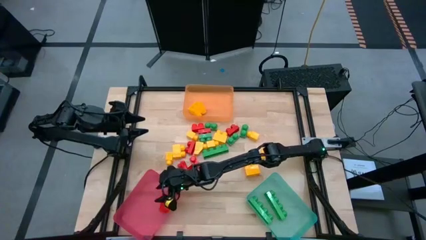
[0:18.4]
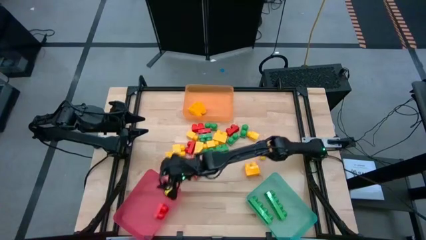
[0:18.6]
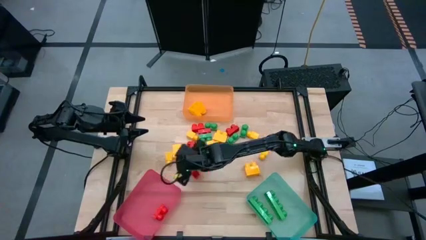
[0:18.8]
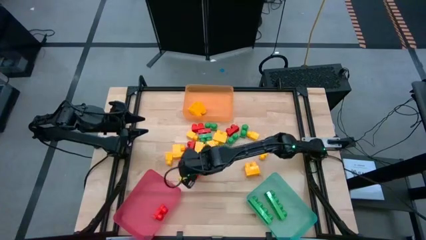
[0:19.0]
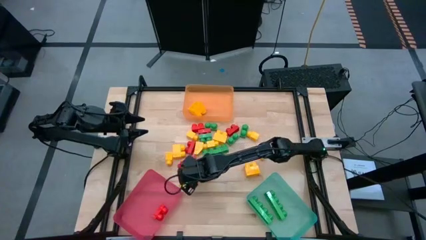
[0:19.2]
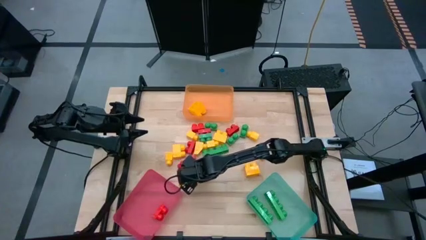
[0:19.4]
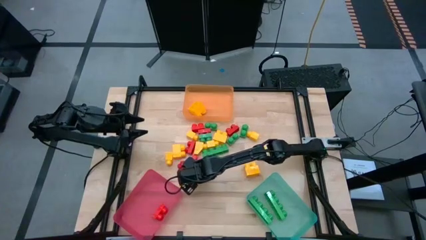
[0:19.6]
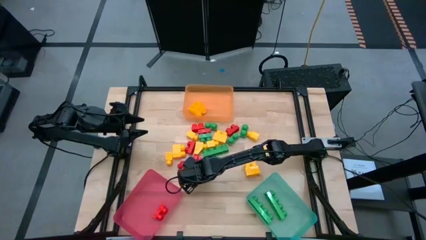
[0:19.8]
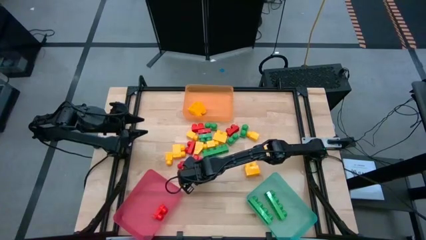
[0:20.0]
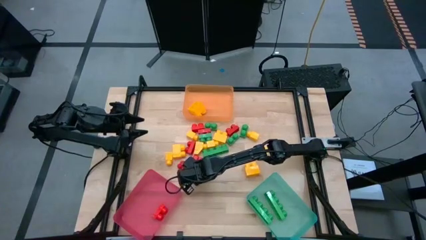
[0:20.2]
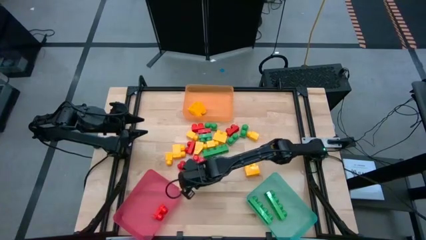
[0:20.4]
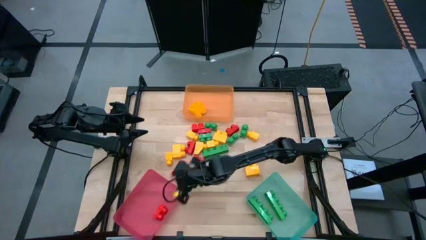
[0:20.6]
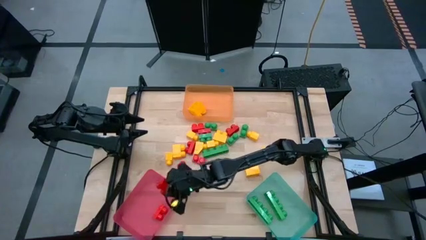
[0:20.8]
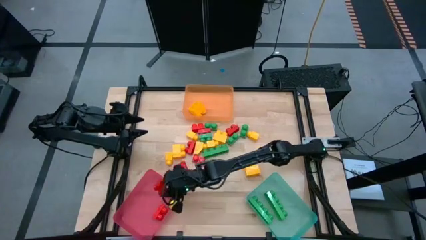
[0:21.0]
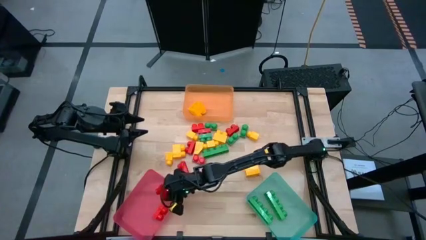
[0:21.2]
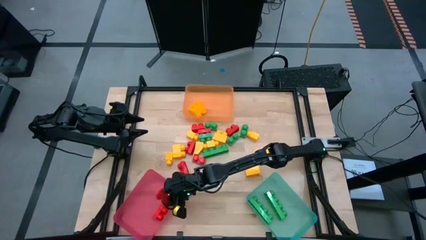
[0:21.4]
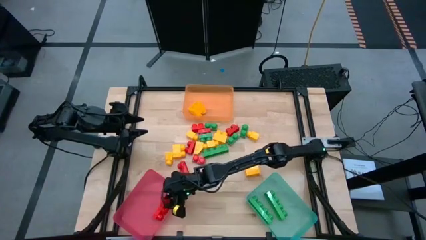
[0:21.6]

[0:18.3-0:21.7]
Task: Sort blocks
Put the red 2 stud game piece into the pink bin

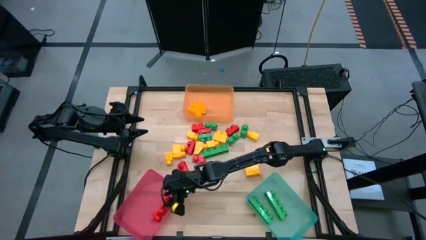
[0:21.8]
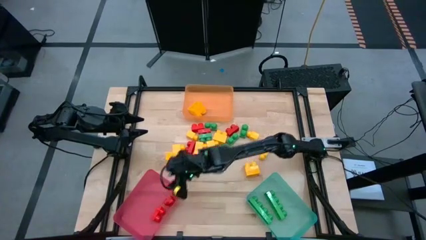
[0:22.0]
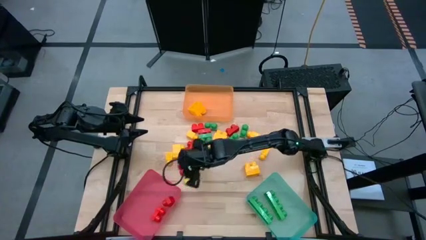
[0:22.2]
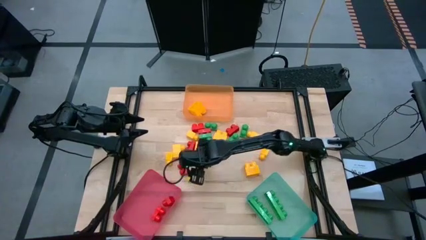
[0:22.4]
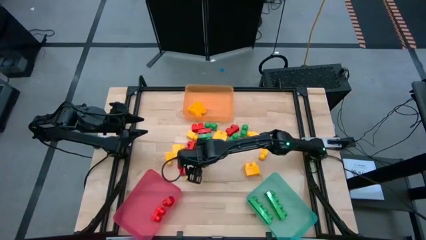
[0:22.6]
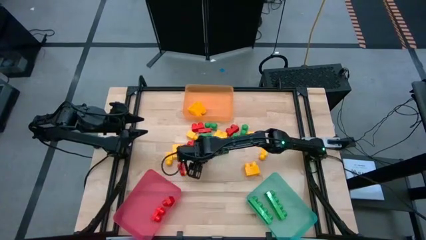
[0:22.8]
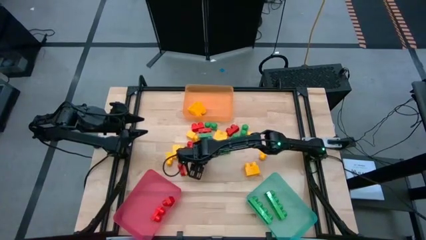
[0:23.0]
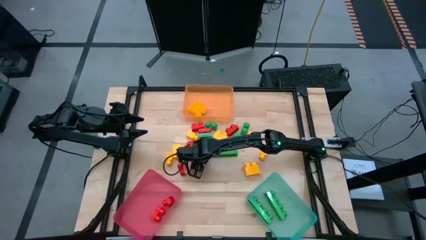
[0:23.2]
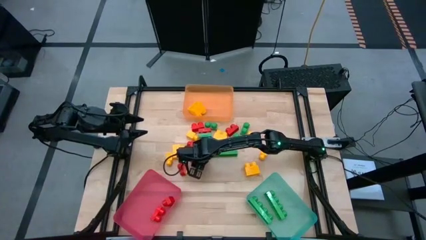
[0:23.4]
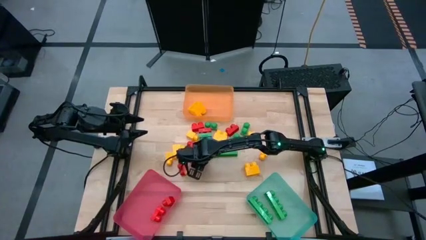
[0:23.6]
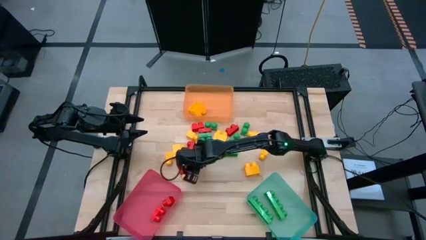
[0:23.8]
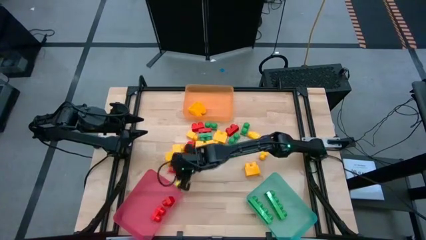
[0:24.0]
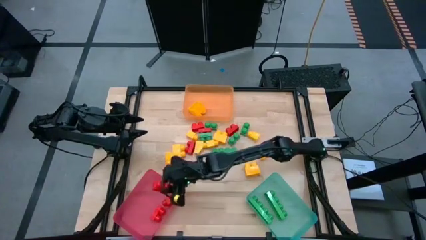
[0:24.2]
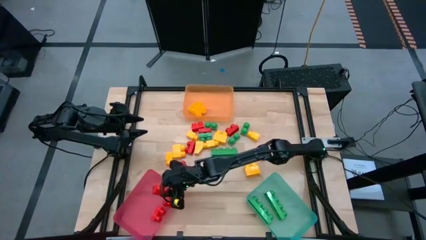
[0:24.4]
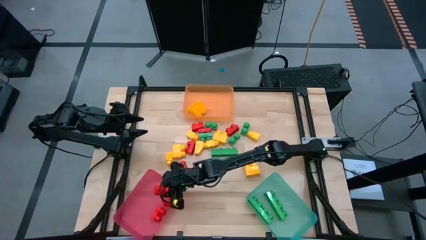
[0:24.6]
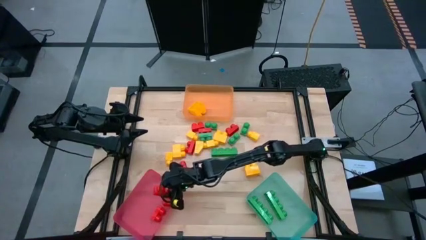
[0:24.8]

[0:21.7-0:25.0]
Put the red 2 stud game piece into the pink bin

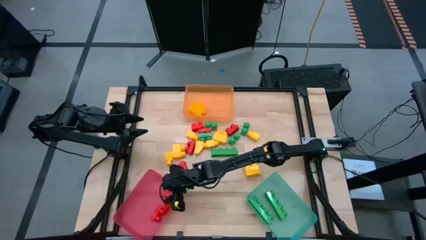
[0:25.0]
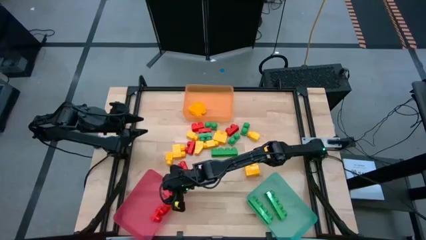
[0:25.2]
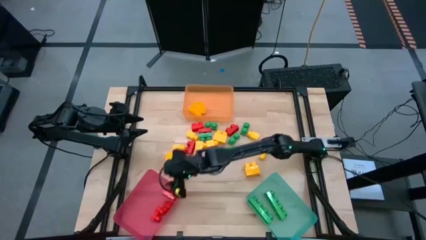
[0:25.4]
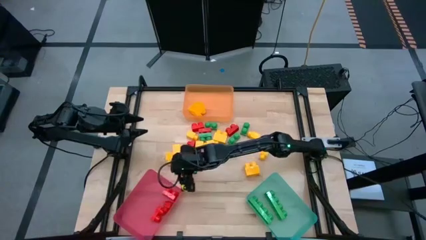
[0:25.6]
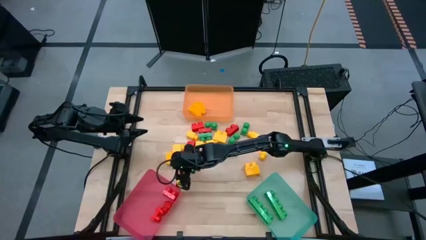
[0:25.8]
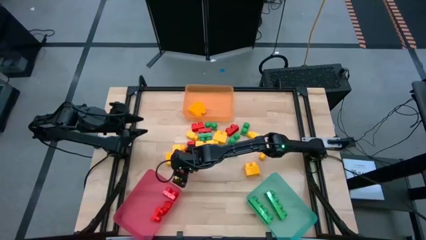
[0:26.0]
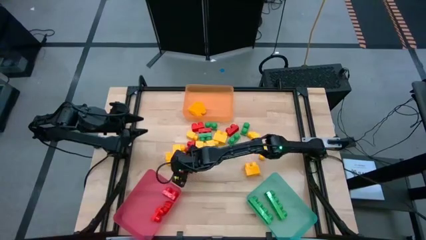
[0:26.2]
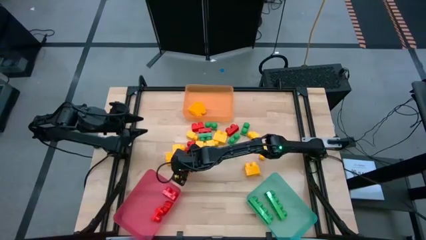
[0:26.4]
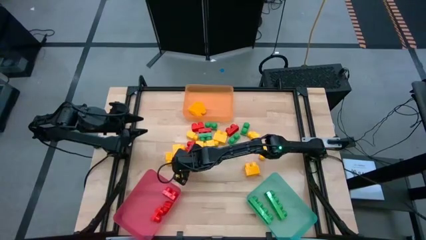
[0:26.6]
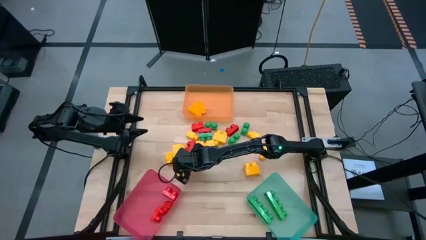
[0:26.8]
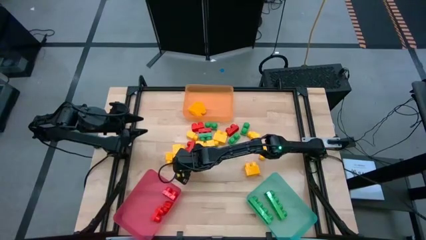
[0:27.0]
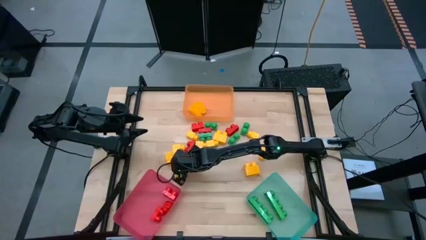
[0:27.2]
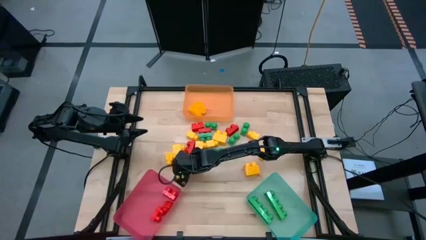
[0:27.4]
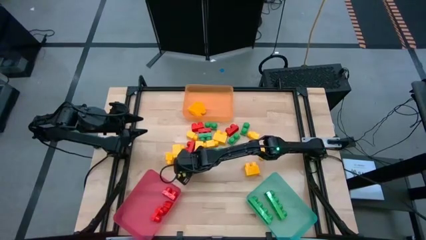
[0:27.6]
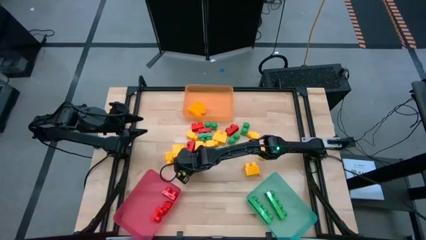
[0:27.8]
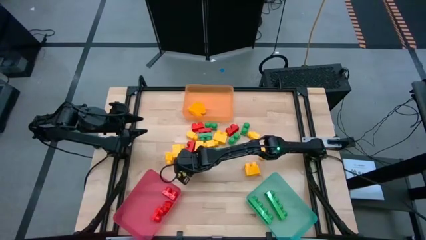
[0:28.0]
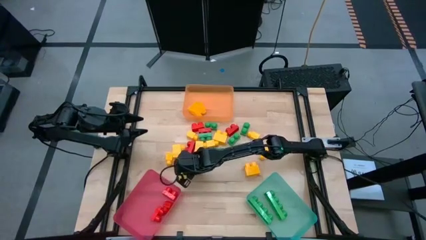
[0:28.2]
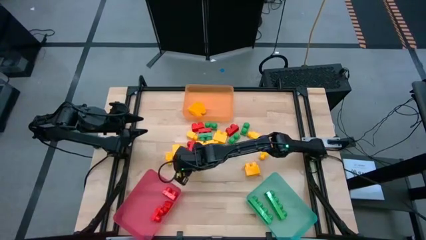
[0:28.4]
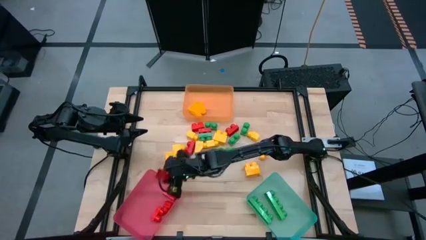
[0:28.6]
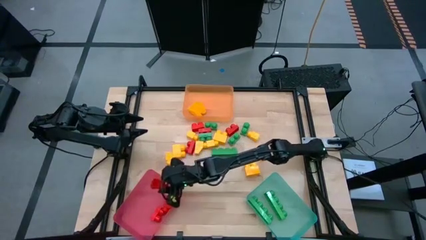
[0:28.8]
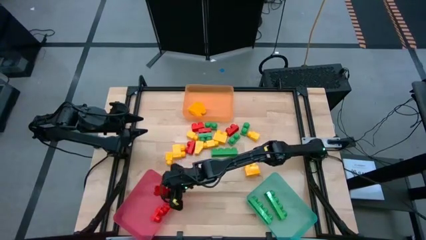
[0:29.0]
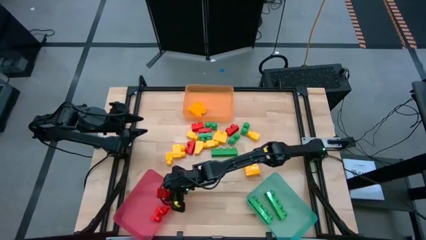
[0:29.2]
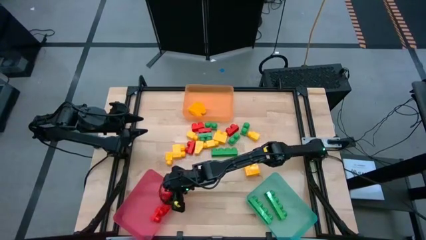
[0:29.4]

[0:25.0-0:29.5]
Put the red 2 stud game piece into the pink bin

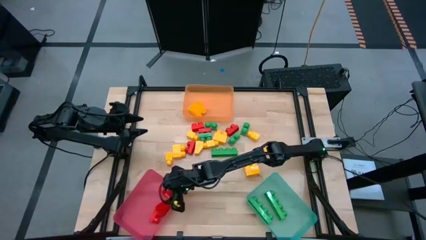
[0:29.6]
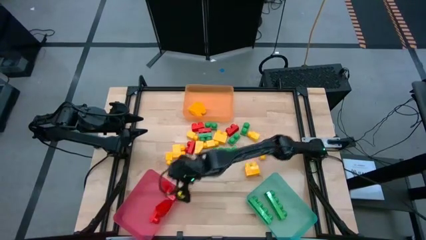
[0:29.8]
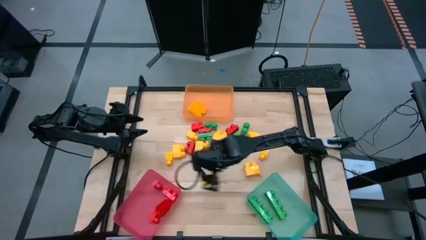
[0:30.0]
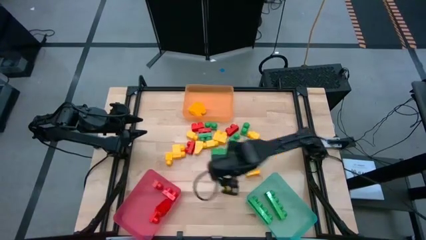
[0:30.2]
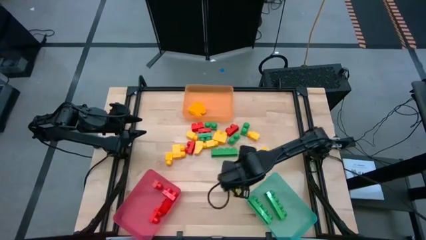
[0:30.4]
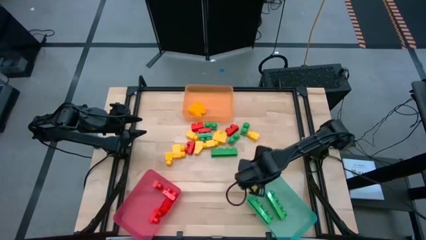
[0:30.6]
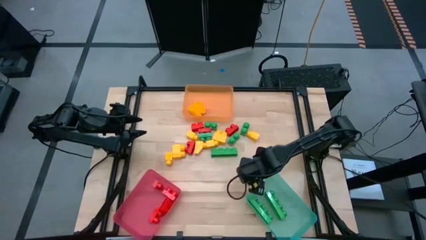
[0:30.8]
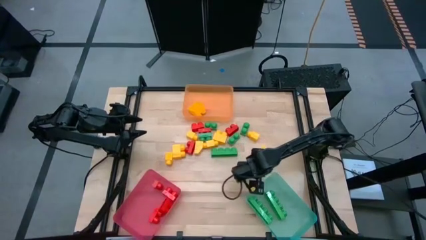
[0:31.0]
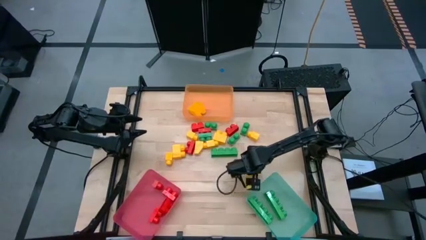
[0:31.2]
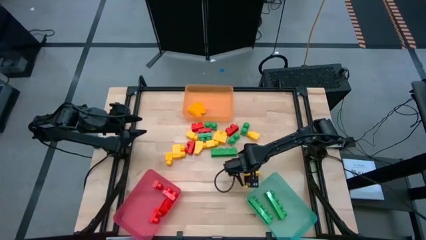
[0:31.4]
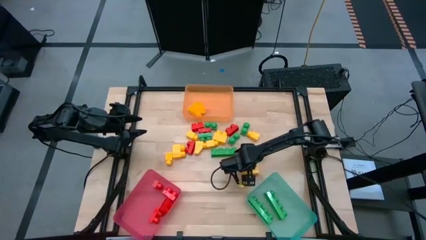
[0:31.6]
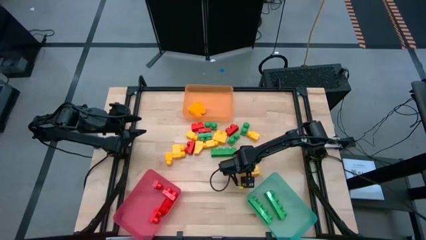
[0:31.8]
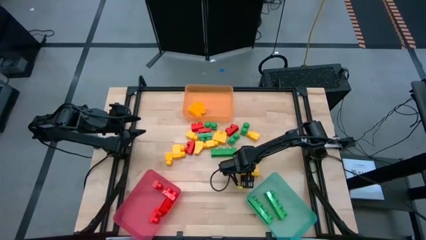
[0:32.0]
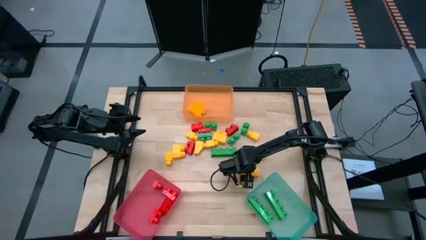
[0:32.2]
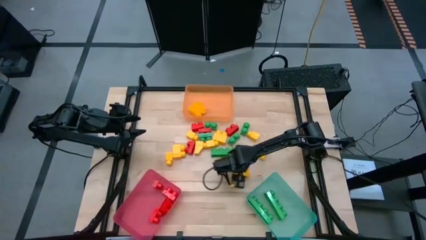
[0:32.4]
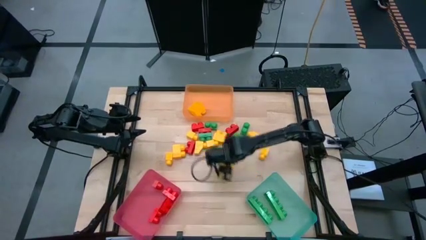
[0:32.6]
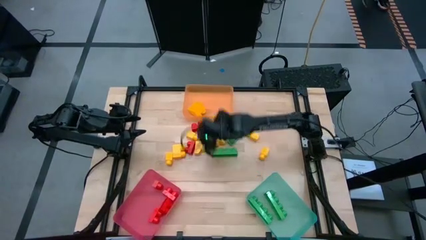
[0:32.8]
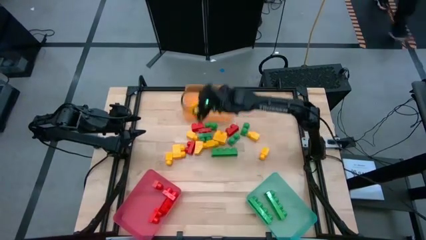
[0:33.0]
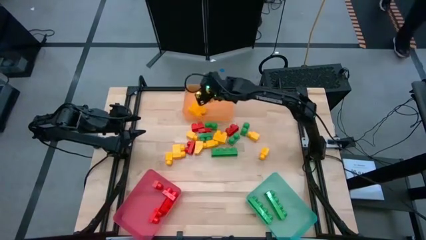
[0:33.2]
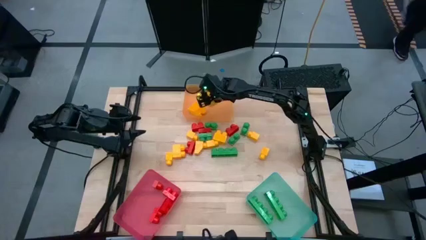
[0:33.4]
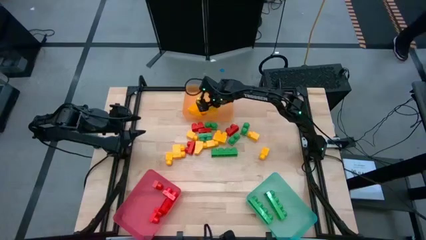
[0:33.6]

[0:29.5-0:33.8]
Put the yellow 2 stud game piece into the orange bin

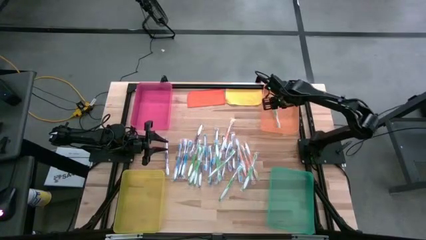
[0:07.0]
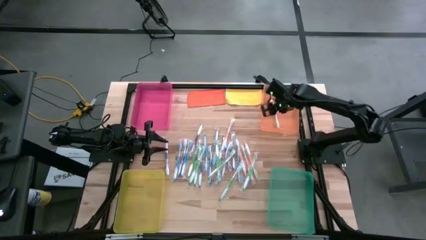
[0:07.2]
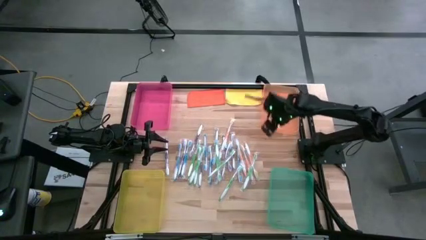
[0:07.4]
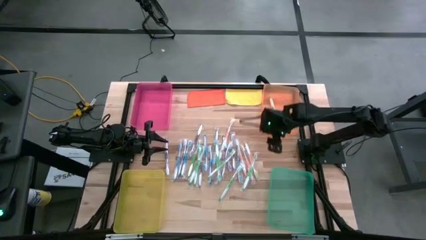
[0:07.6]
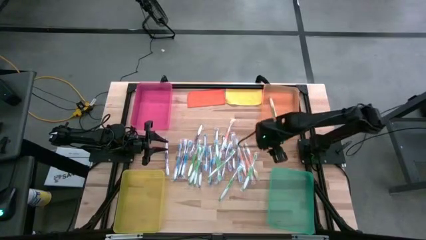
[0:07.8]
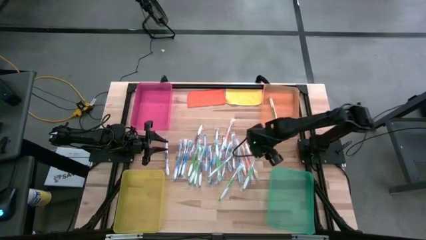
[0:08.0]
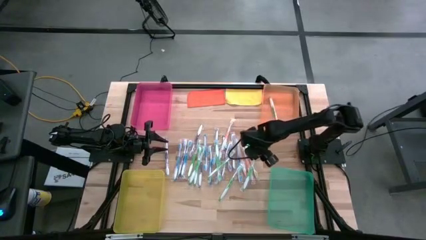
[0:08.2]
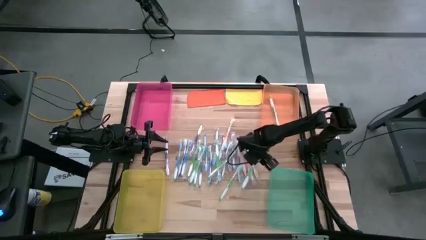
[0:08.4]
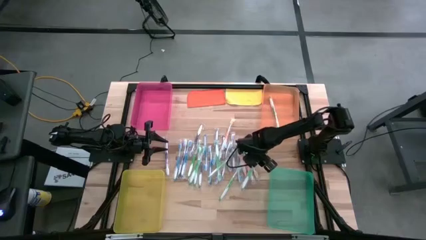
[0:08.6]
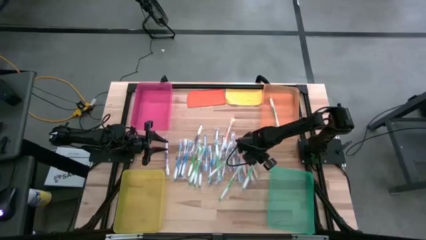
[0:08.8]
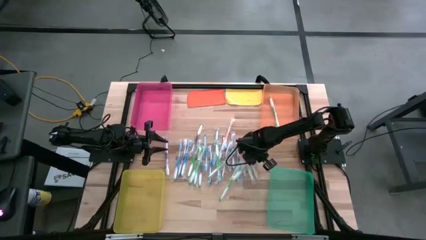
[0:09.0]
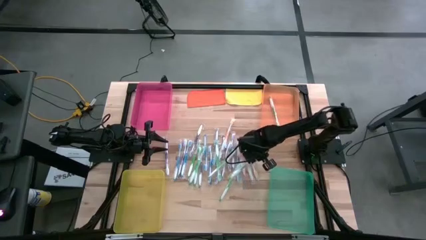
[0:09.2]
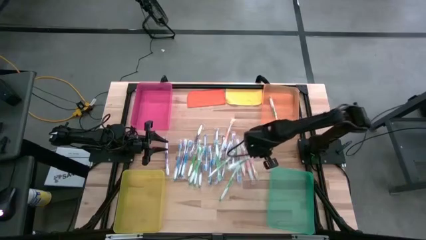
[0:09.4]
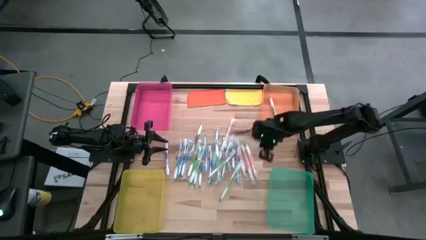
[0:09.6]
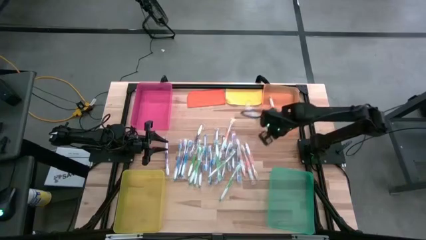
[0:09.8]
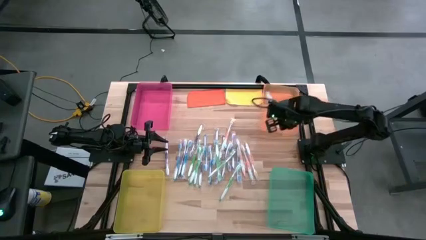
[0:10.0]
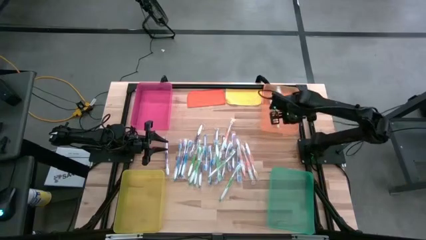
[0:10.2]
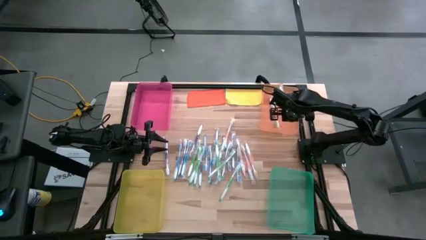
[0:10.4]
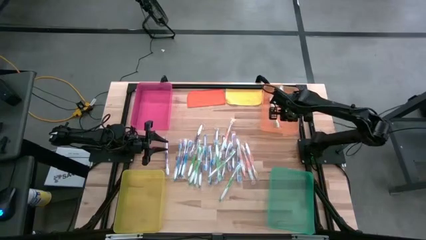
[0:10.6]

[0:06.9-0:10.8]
Task: Pick & Place Toothbrushes
Put the green toothbrush into the orange bin
